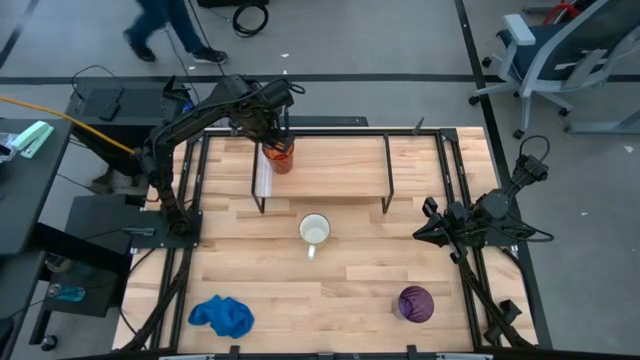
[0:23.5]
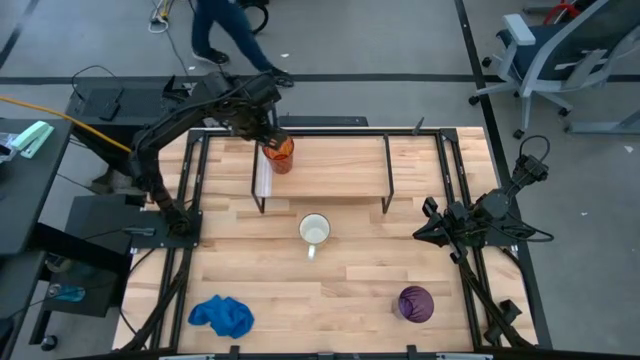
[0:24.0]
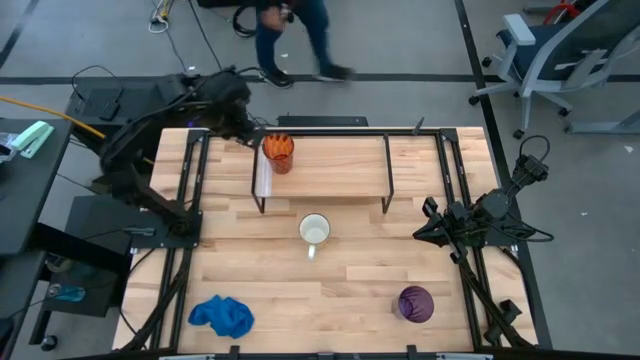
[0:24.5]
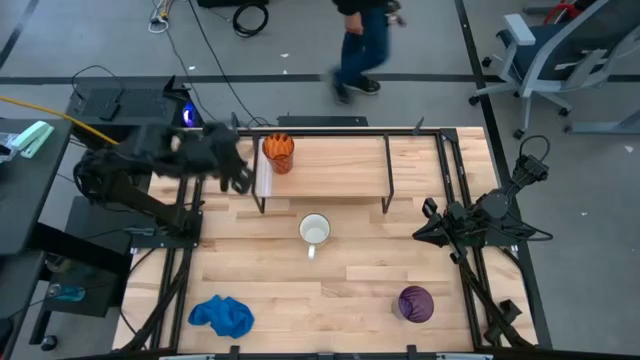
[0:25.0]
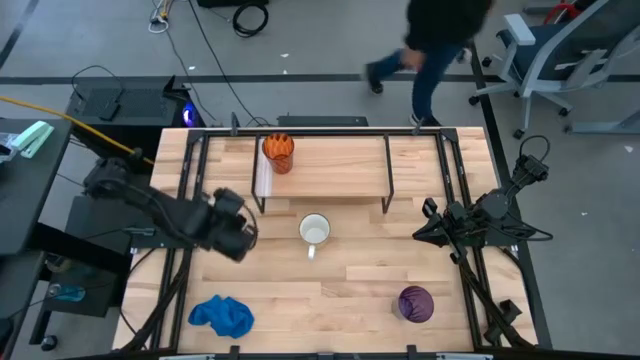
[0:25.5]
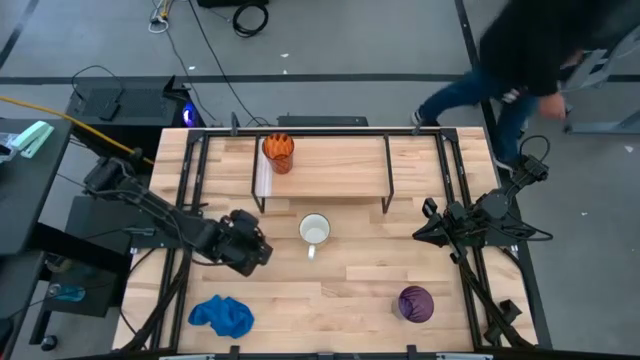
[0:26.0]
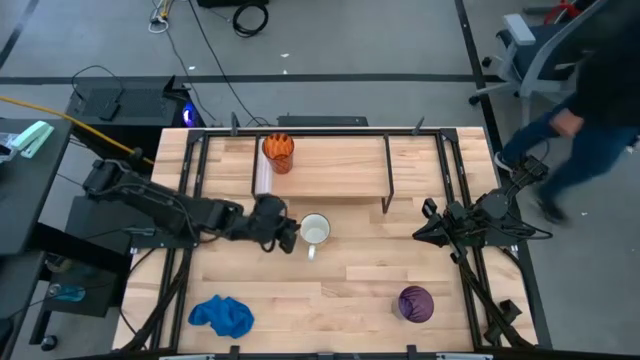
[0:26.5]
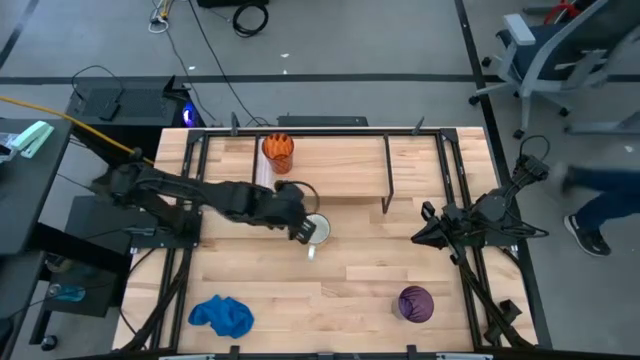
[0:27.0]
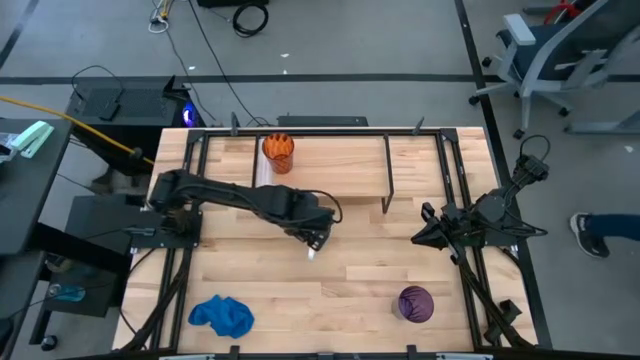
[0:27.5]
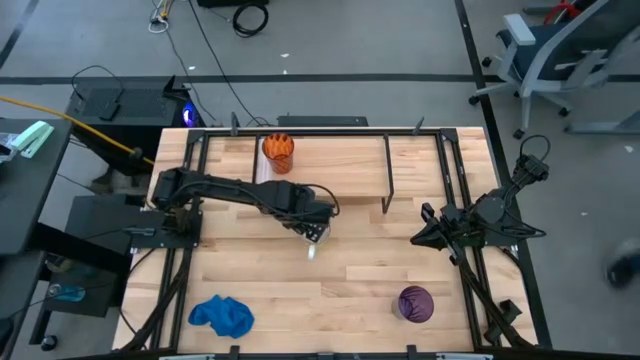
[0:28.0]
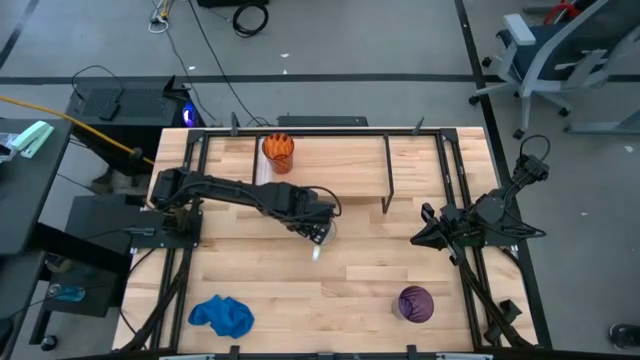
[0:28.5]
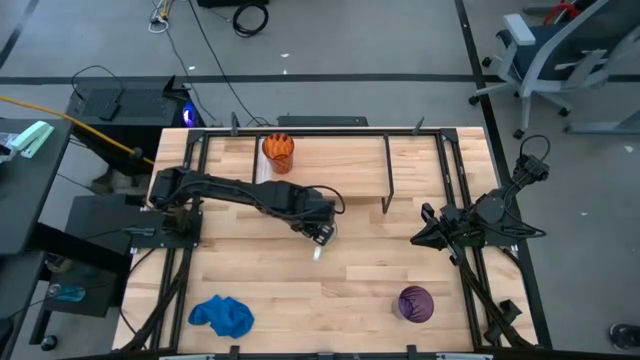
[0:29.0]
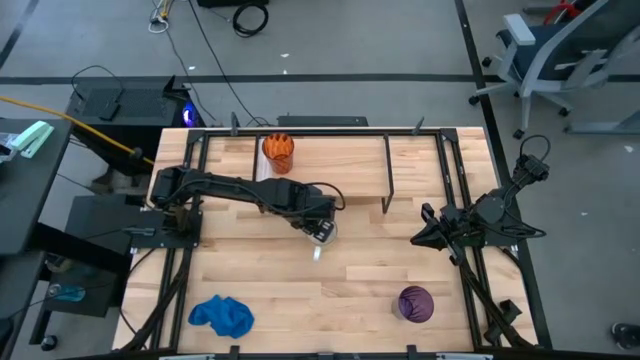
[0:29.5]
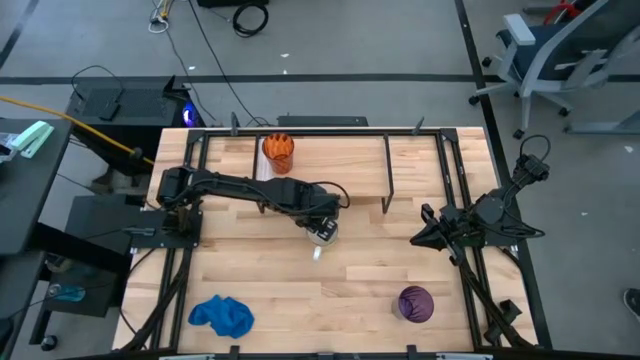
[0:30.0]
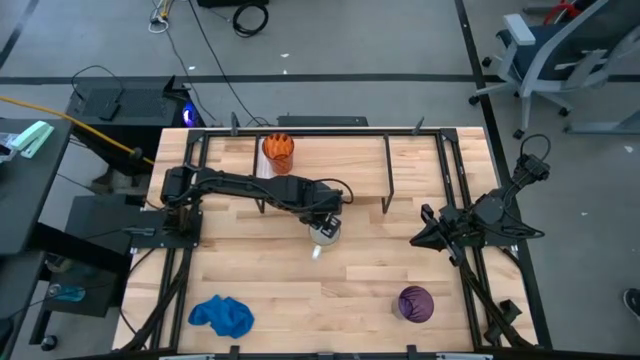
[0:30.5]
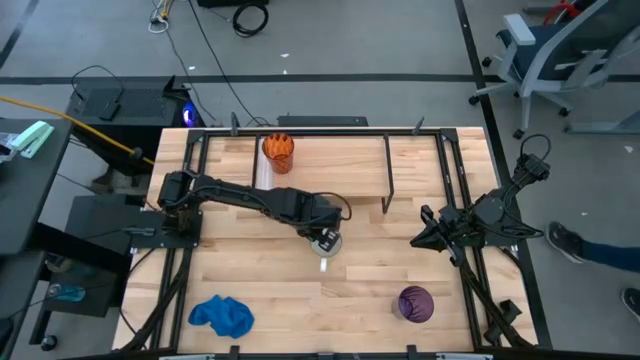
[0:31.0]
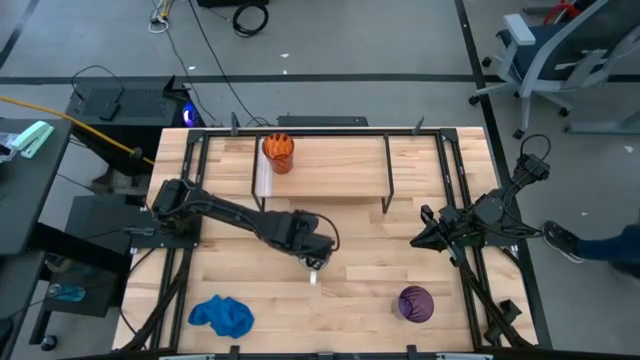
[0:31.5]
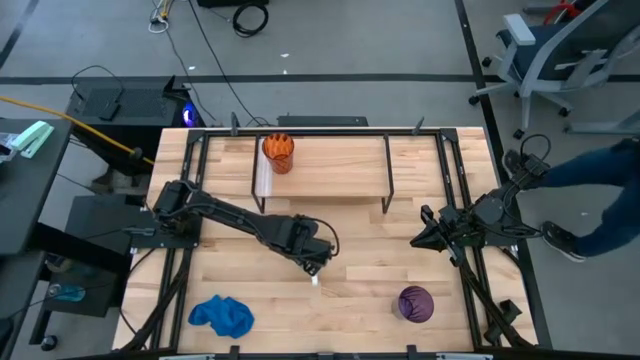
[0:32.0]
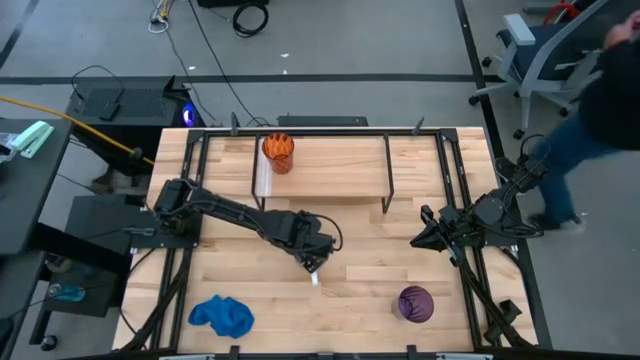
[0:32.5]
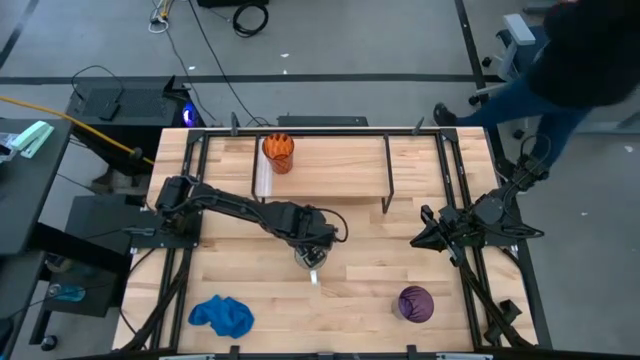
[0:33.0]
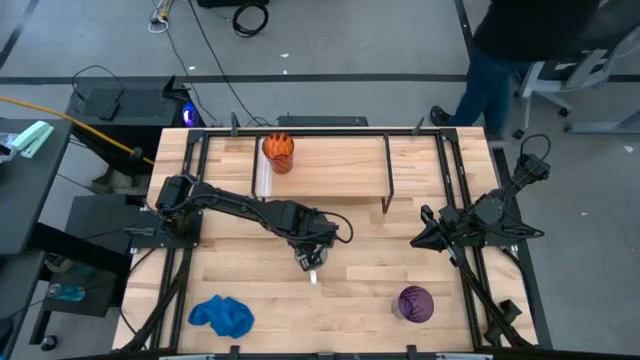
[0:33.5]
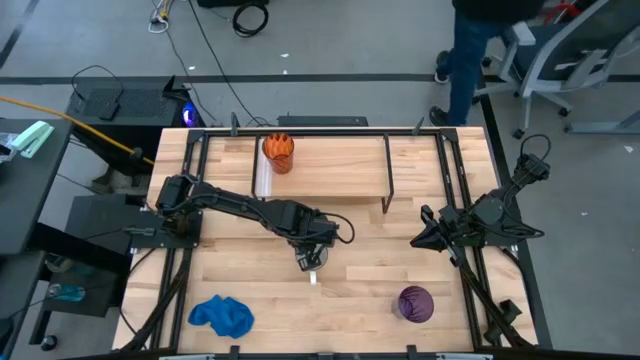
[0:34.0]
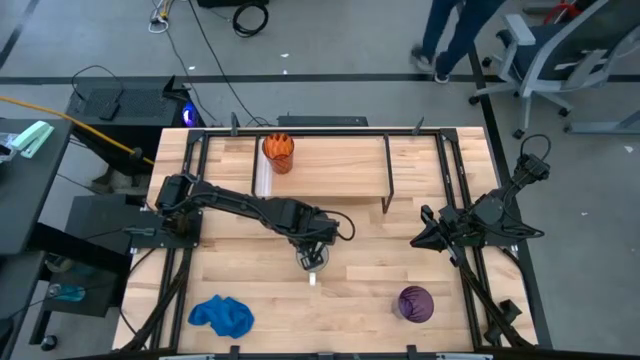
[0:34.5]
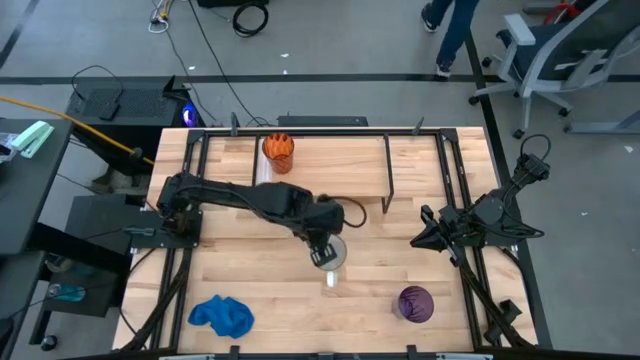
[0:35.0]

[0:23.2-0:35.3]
Task: Stack small to large cups/mugs on shelf
Put the yellow mug on the shelf

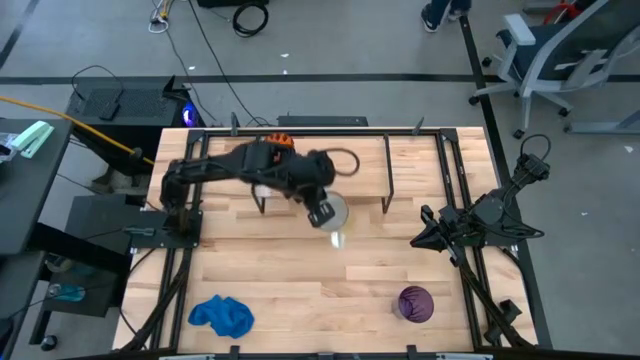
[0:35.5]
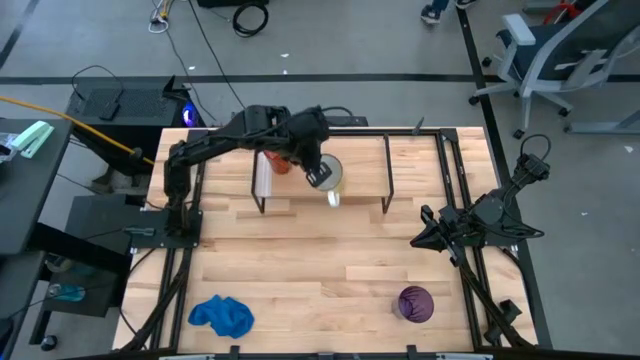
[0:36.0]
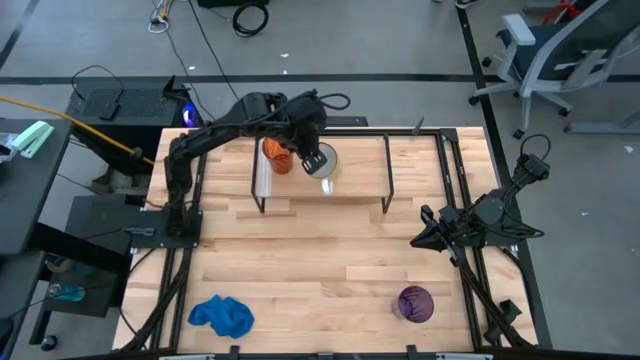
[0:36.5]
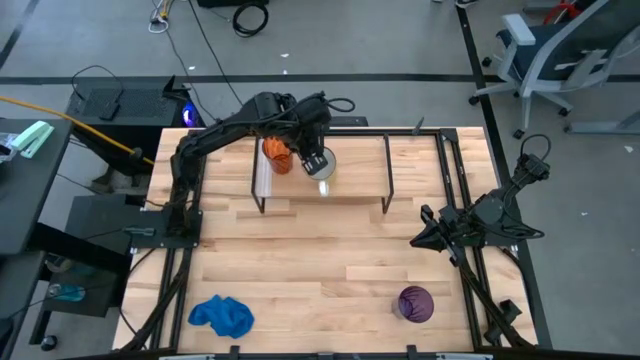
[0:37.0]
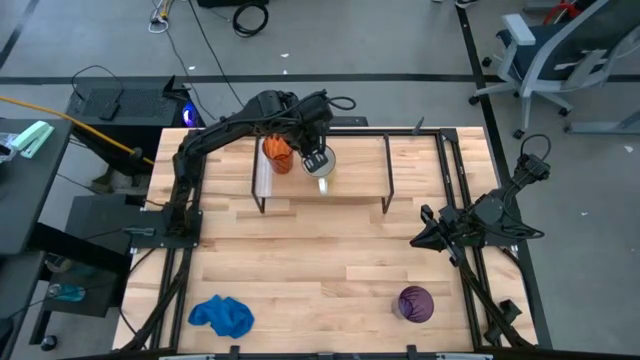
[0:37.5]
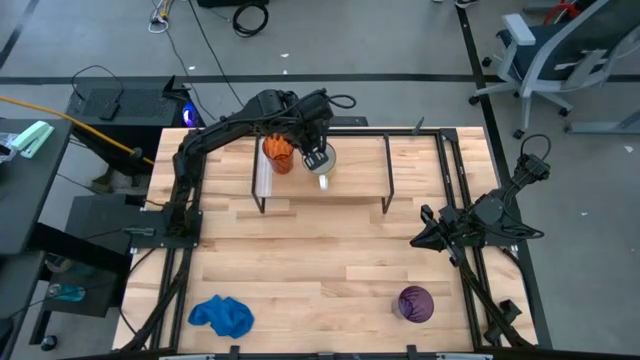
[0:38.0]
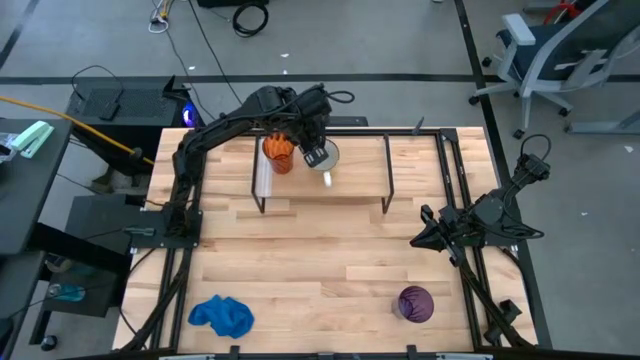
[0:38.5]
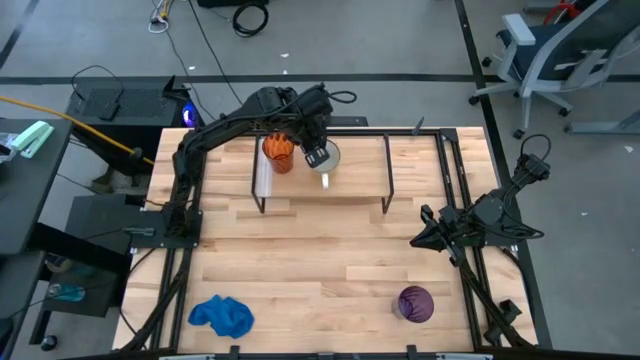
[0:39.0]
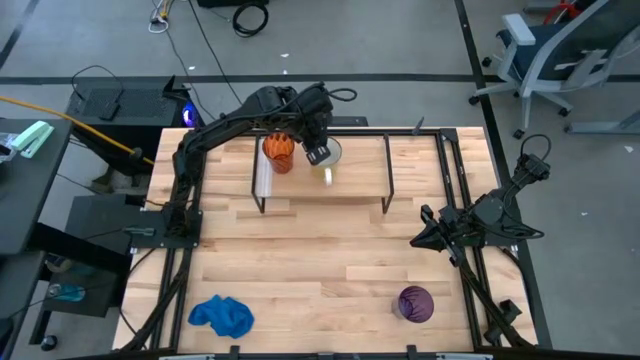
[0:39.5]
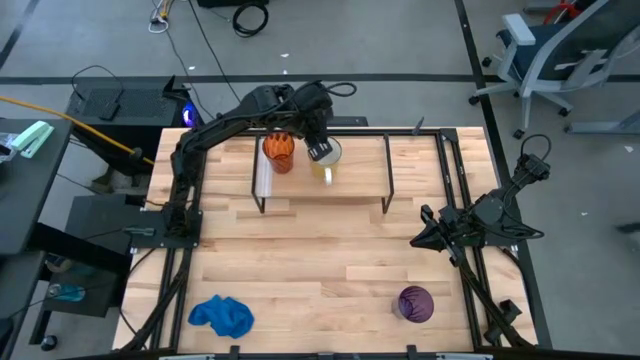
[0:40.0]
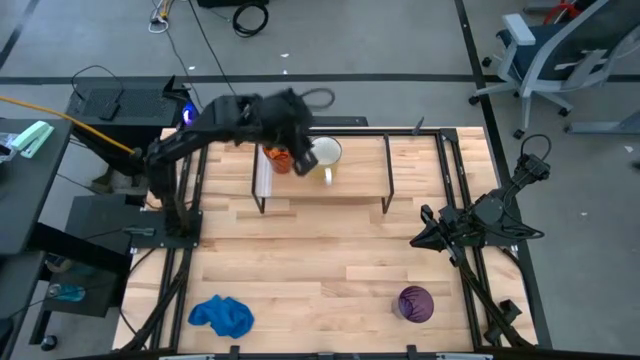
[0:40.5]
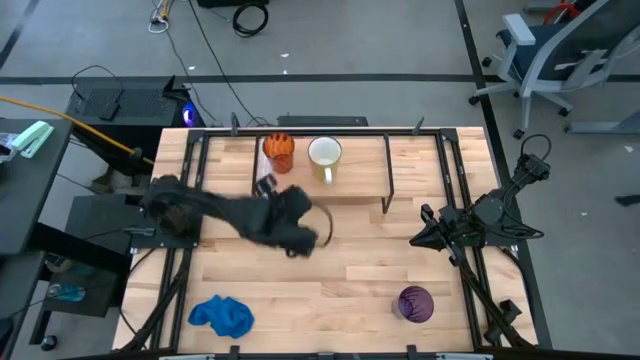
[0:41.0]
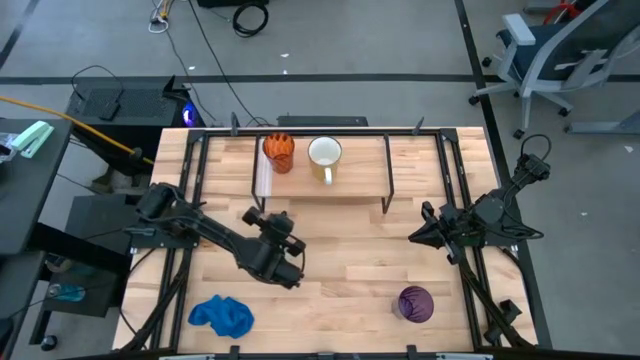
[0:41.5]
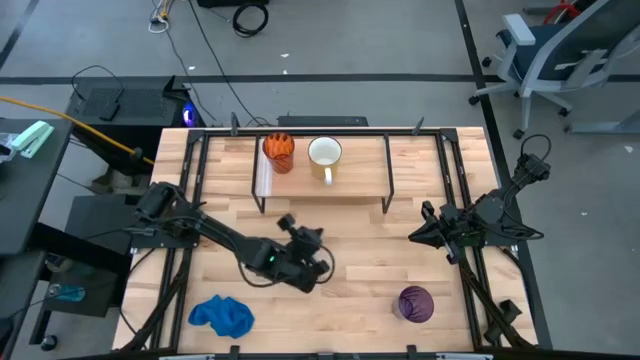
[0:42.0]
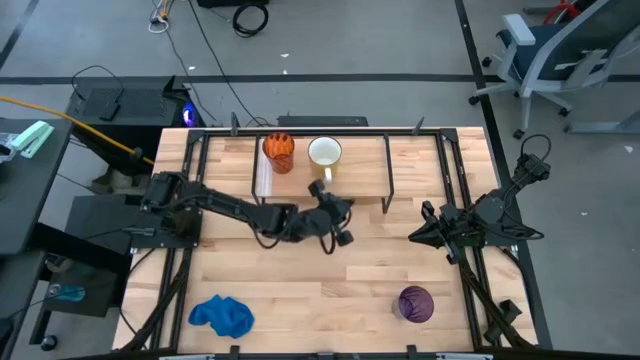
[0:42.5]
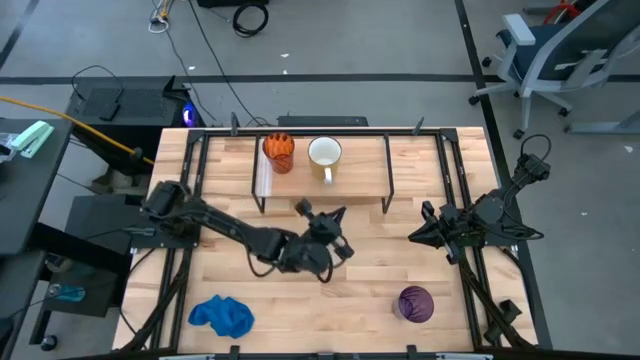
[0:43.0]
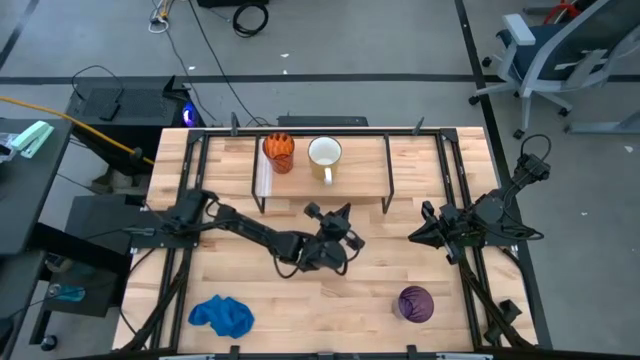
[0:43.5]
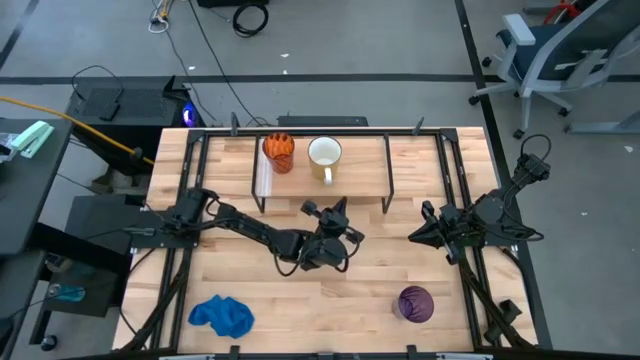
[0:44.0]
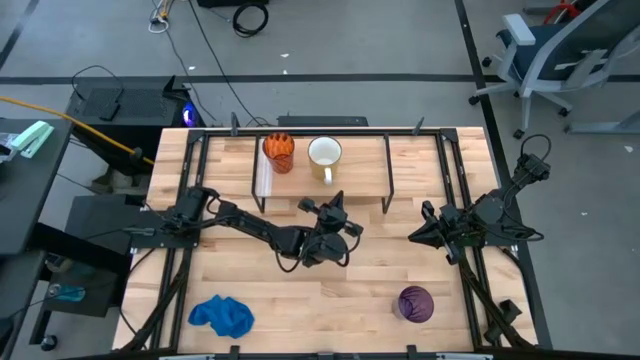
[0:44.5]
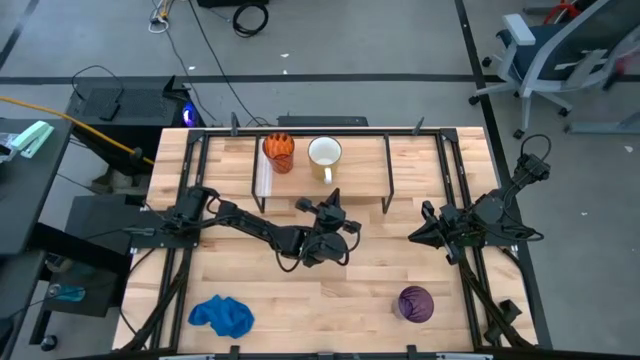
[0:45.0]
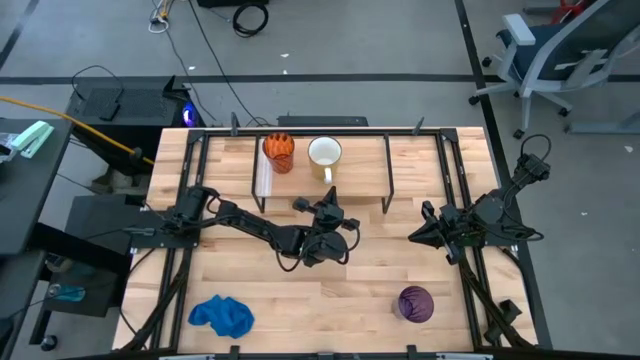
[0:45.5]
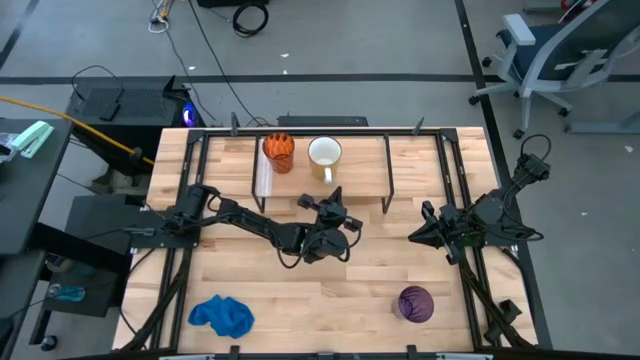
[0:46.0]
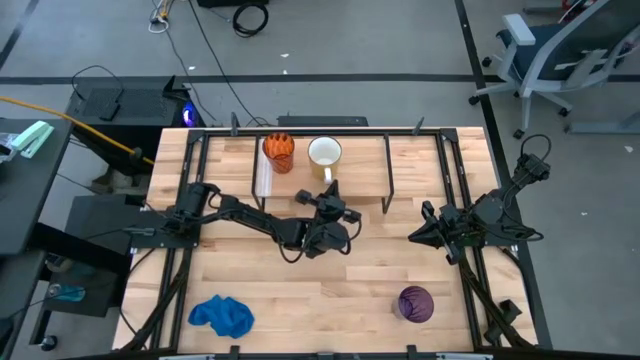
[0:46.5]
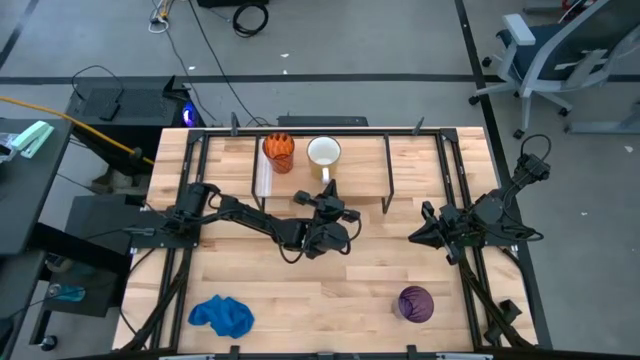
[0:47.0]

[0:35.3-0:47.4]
Put the yellow mug on the shelf
